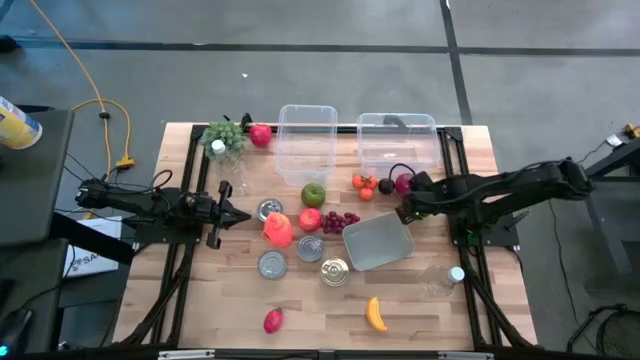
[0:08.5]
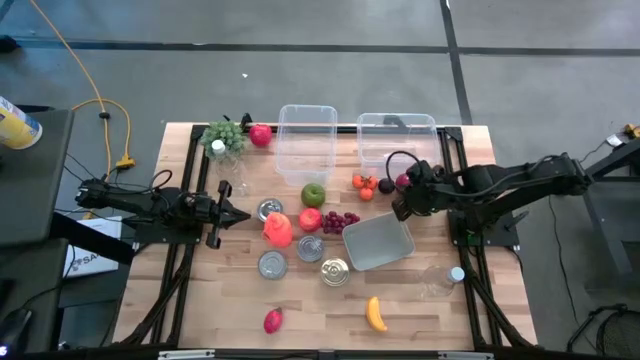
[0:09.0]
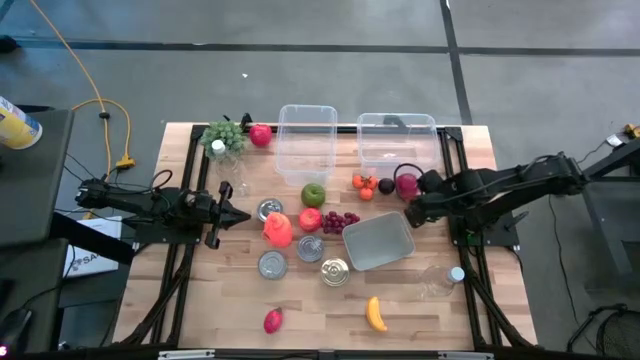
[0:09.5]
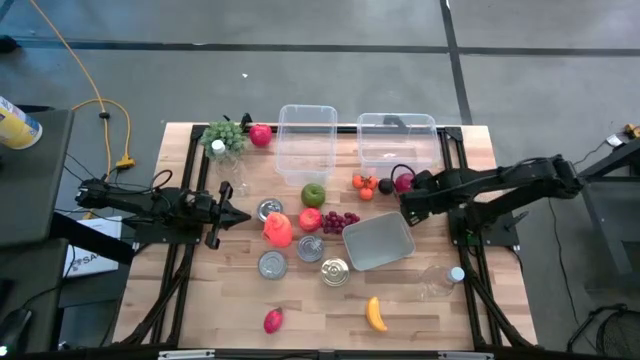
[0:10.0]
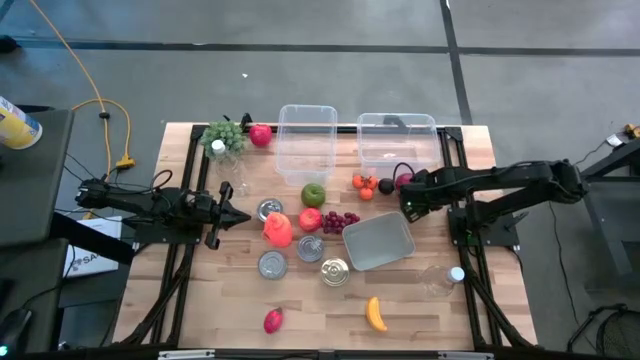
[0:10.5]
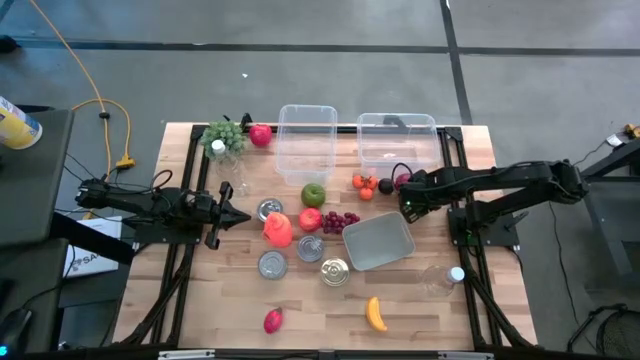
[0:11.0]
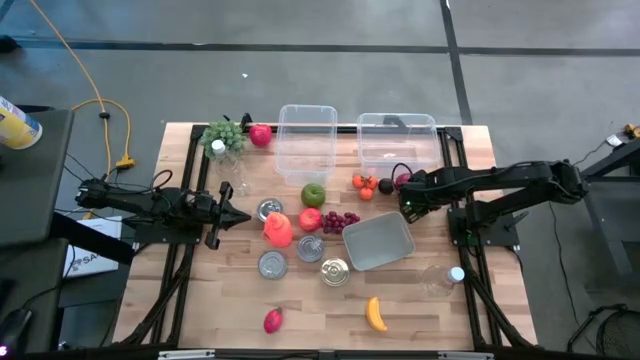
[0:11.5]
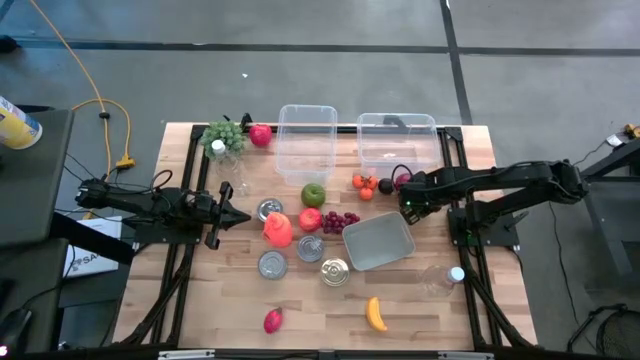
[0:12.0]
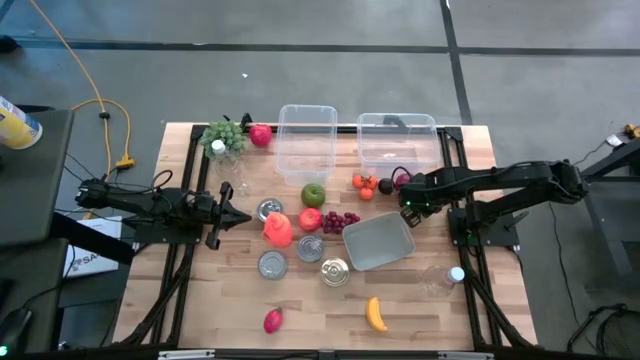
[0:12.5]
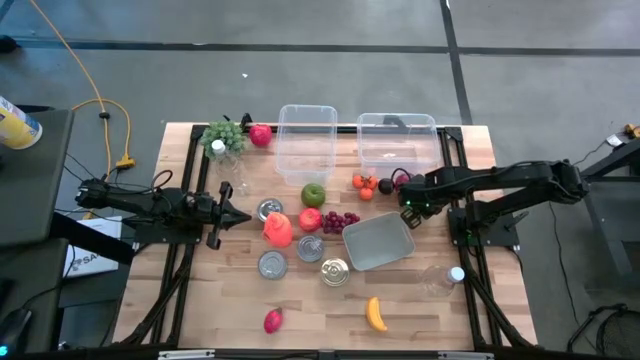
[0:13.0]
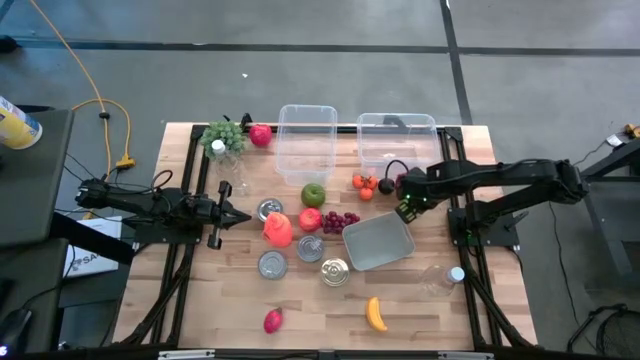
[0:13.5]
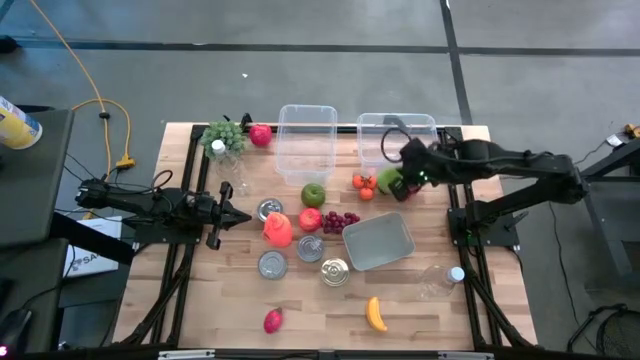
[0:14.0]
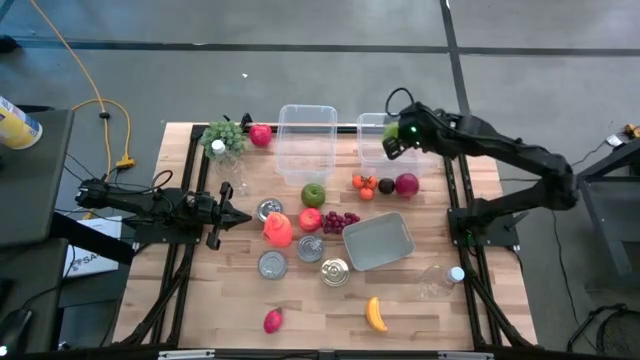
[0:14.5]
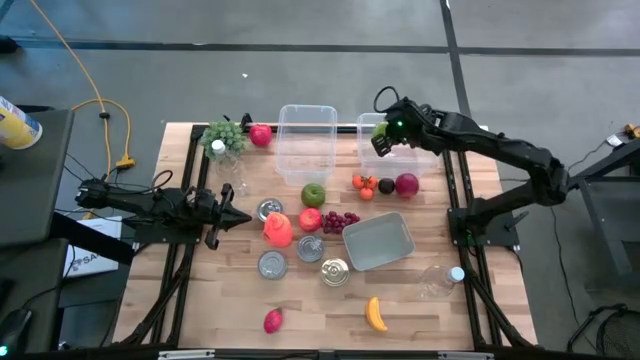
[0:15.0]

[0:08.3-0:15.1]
Task: Pick & Place Food Item
Put the pear into the right transparent bin

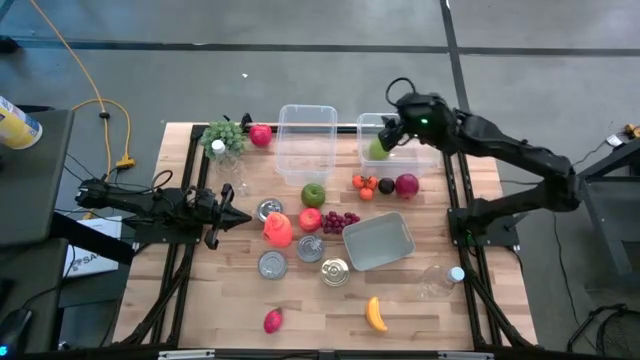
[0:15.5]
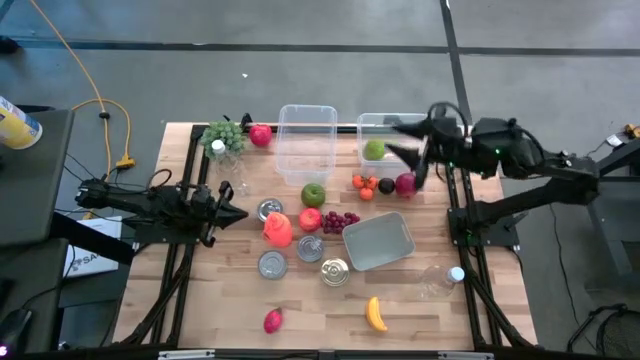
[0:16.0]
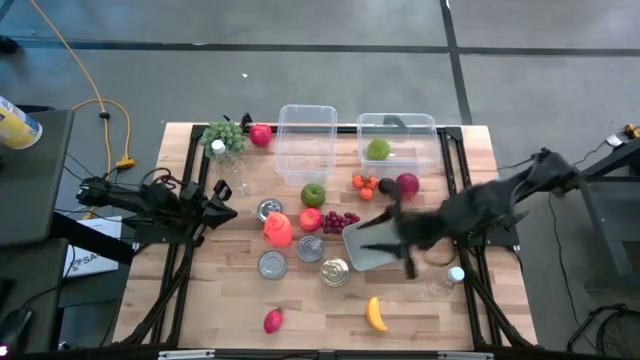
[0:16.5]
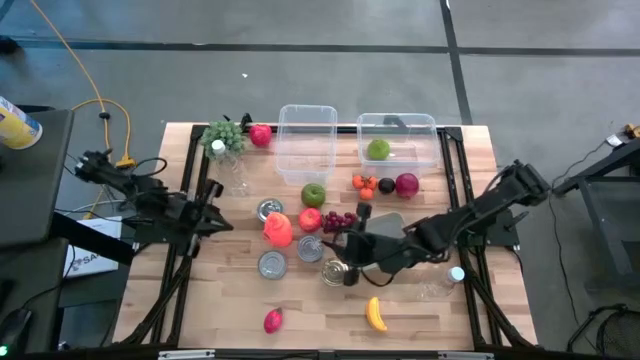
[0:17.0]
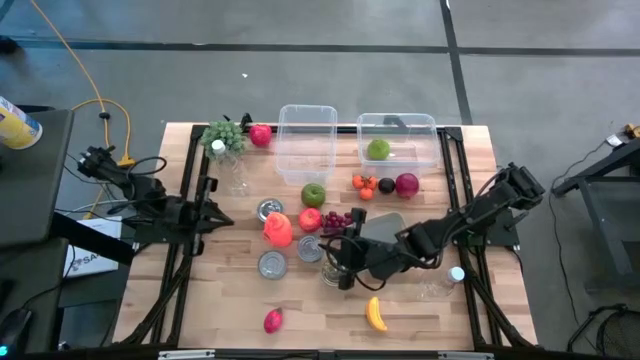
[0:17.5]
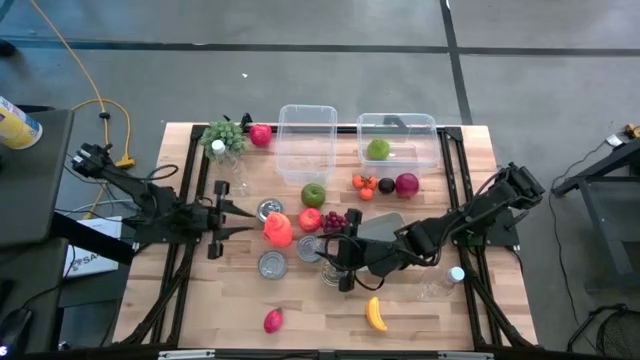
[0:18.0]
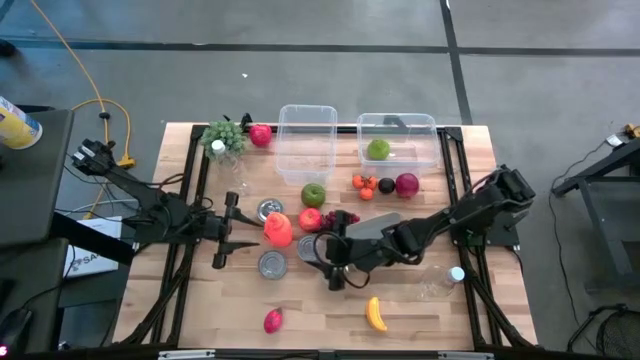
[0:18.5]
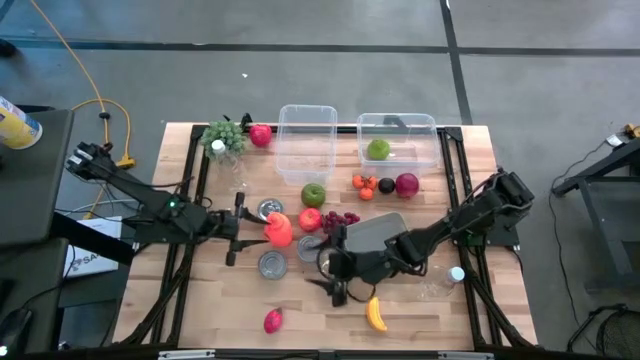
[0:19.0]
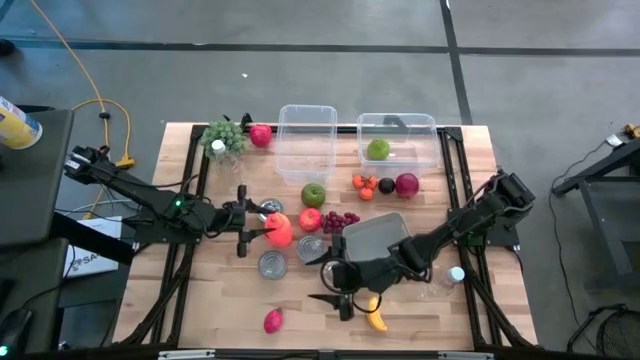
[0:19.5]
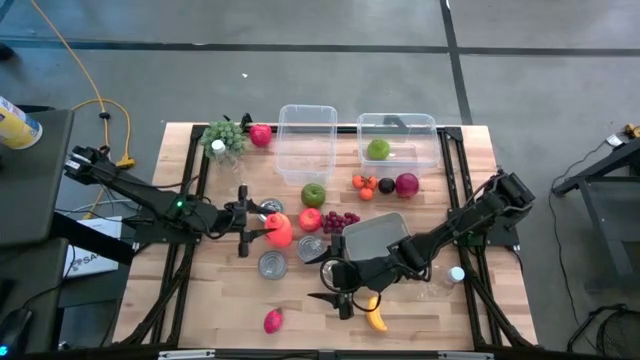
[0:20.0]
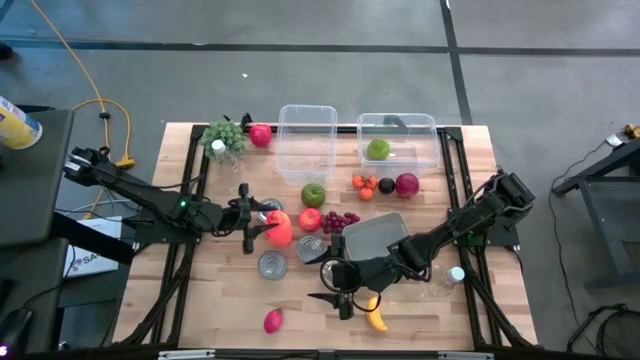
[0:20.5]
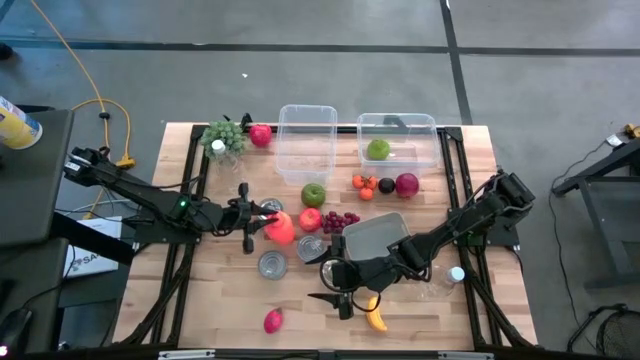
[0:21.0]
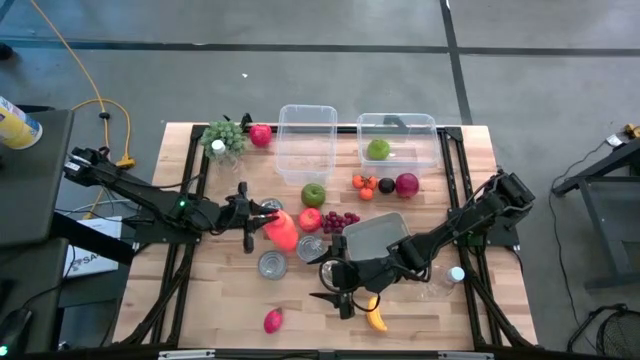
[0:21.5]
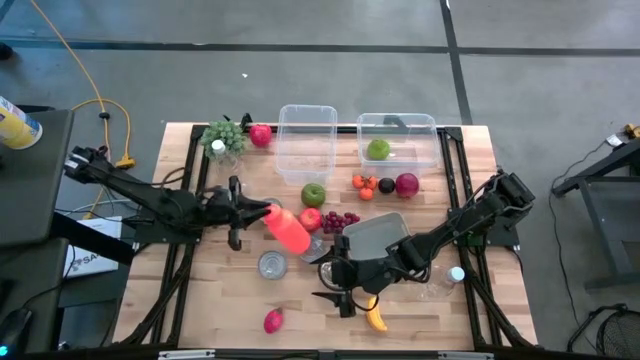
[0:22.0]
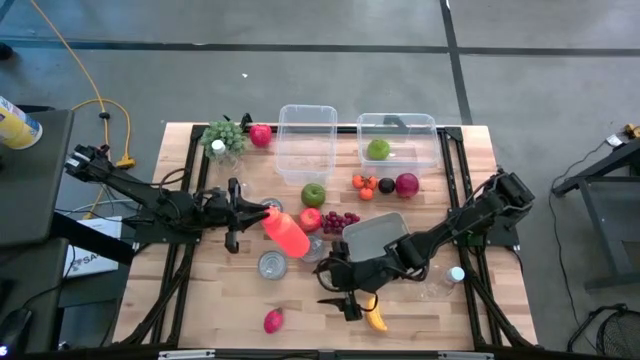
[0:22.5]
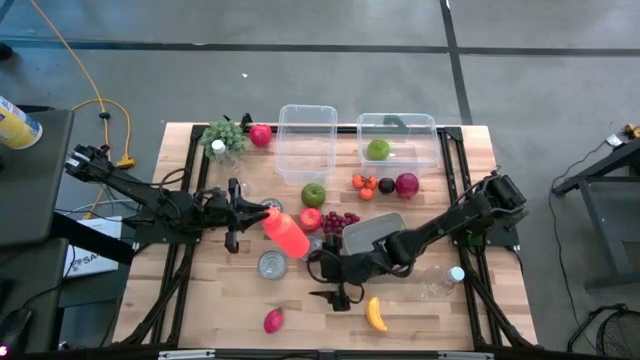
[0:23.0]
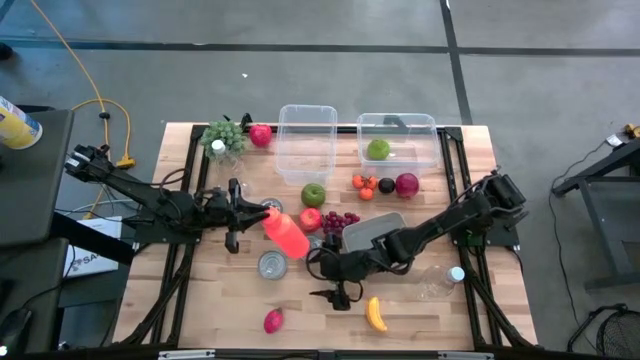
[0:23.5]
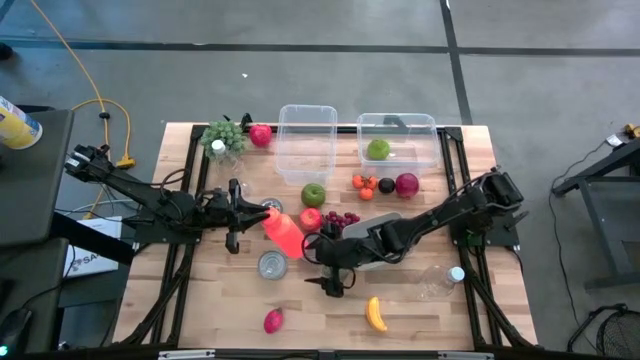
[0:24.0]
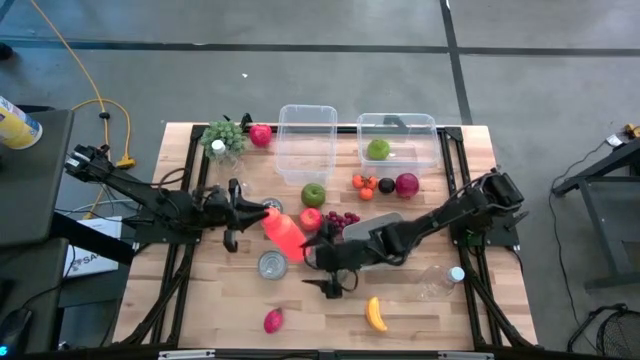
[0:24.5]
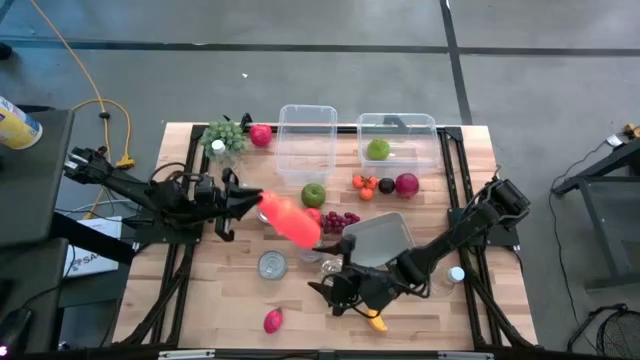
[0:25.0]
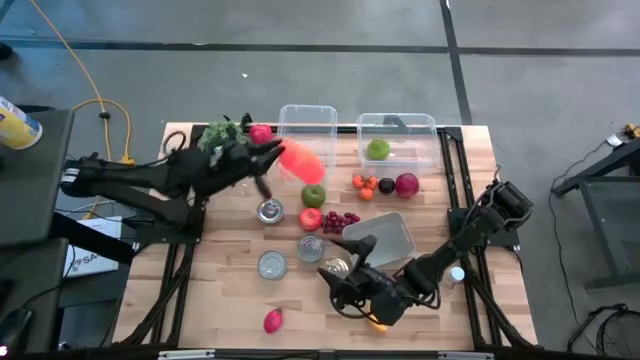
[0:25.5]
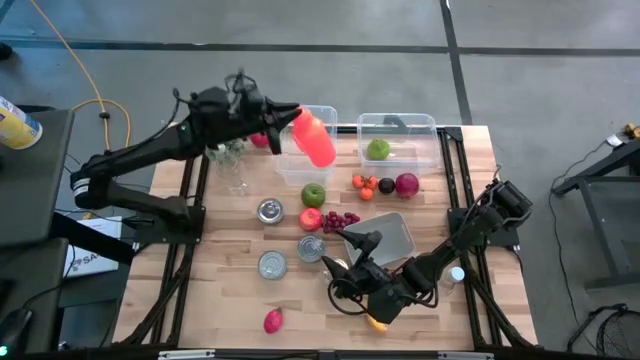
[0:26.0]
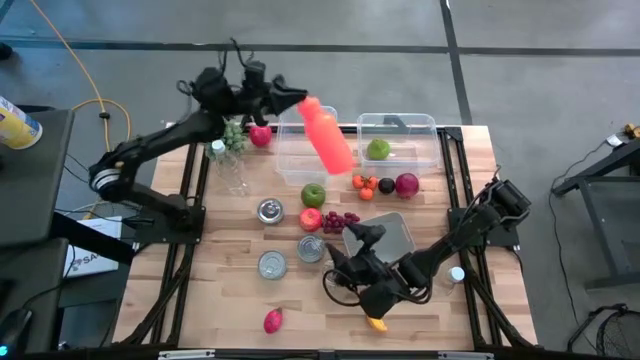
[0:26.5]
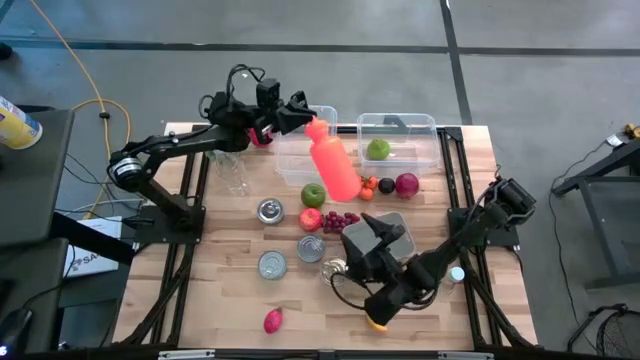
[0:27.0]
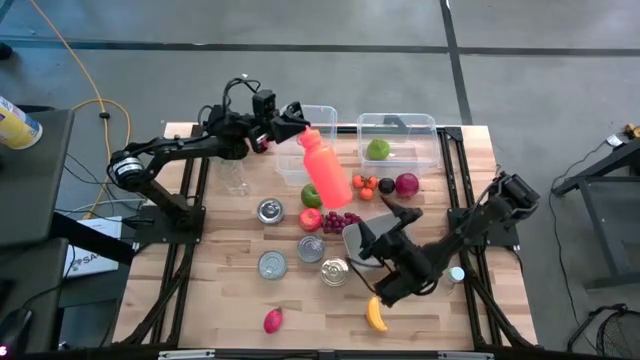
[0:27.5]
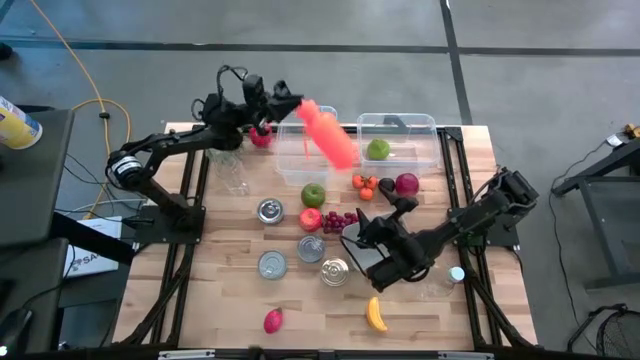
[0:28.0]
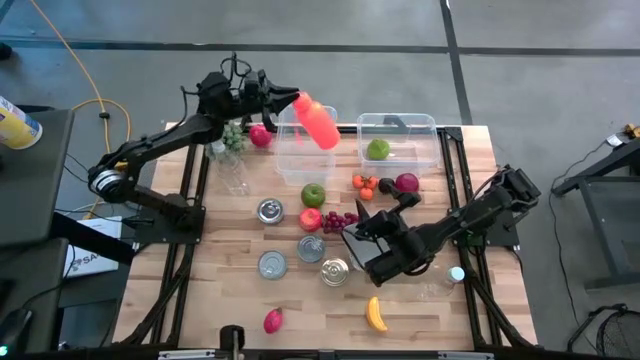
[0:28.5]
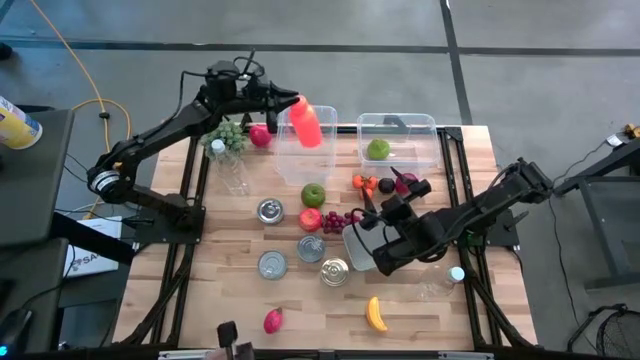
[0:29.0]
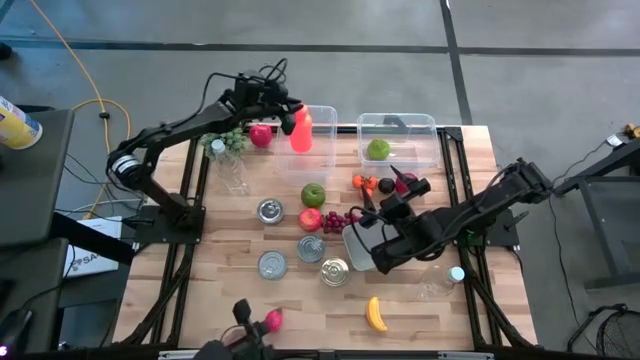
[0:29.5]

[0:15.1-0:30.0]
Put the orange water bottle into the left transparent bin

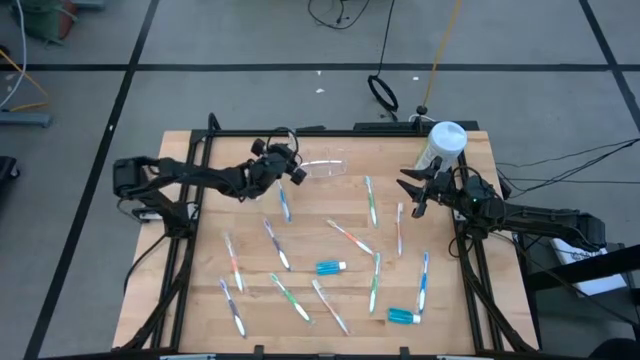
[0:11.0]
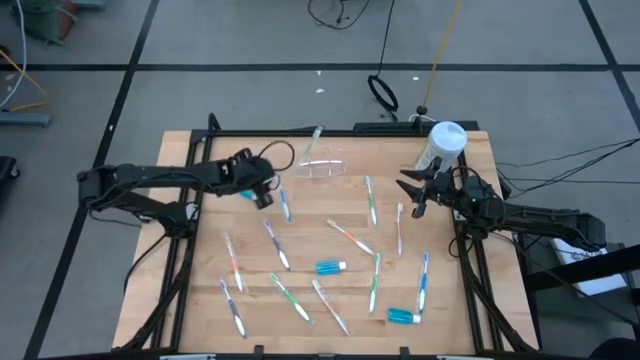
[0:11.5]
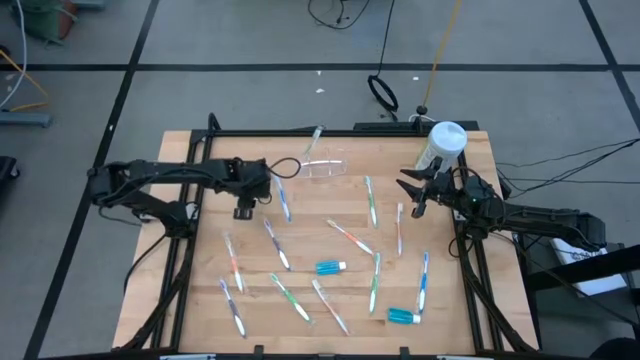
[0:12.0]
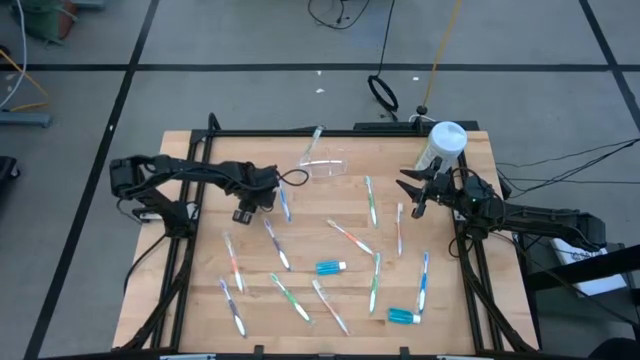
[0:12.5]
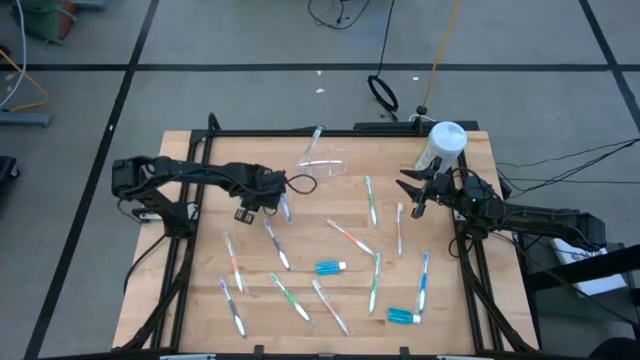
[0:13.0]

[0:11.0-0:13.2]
Task: Pick & Place Toothbrushes
Put the mouthwash into the transparent organizer
